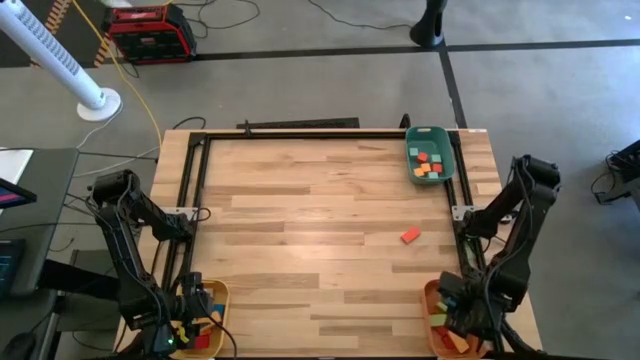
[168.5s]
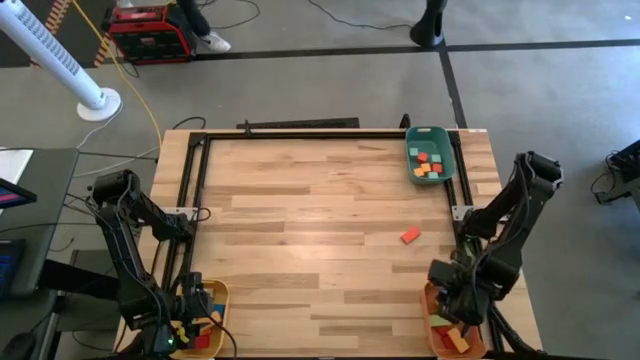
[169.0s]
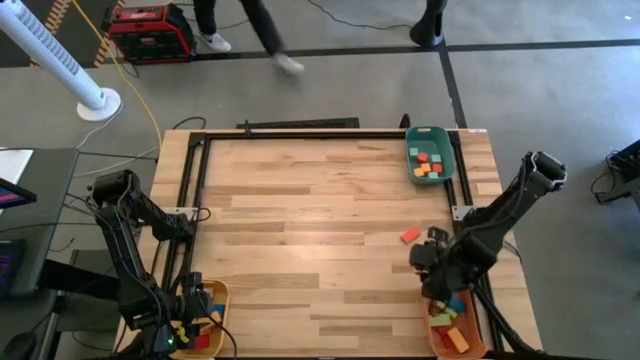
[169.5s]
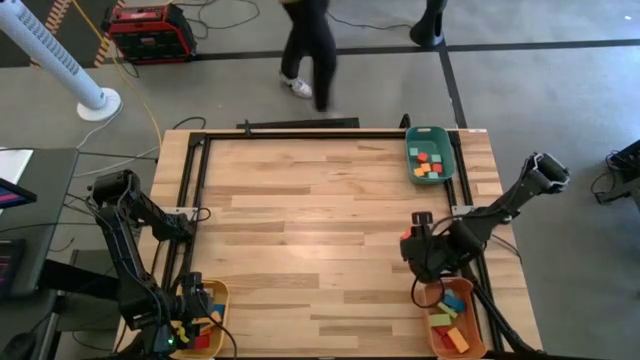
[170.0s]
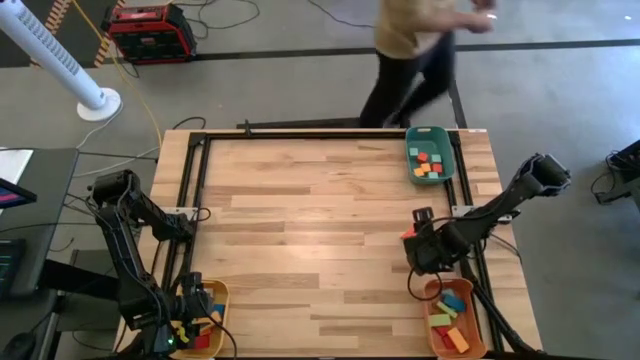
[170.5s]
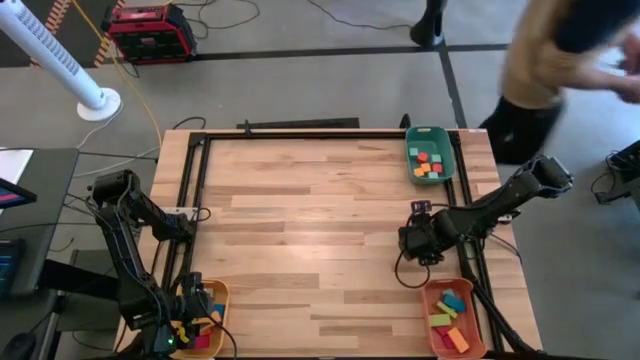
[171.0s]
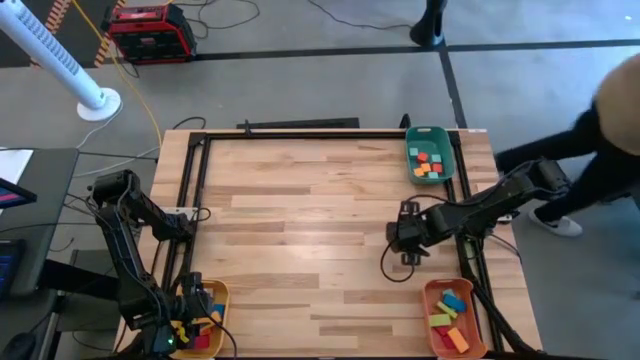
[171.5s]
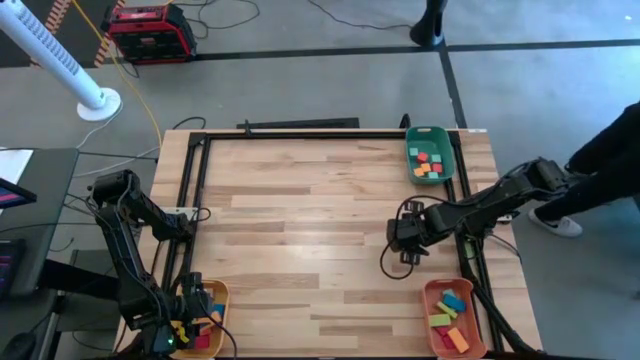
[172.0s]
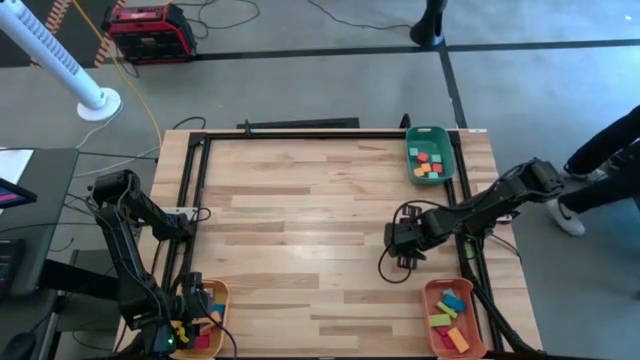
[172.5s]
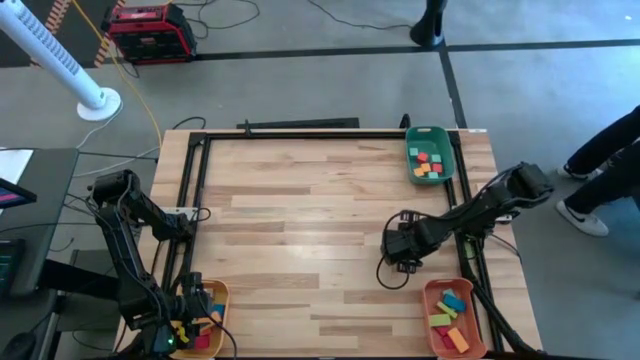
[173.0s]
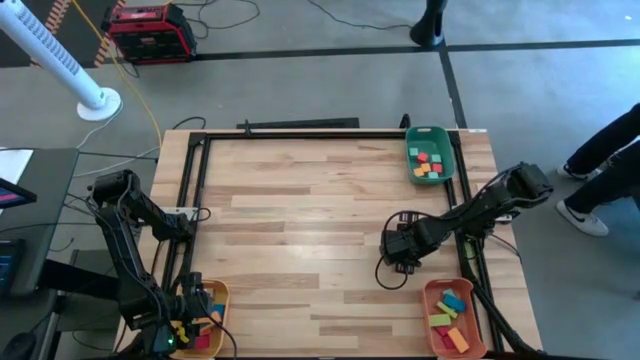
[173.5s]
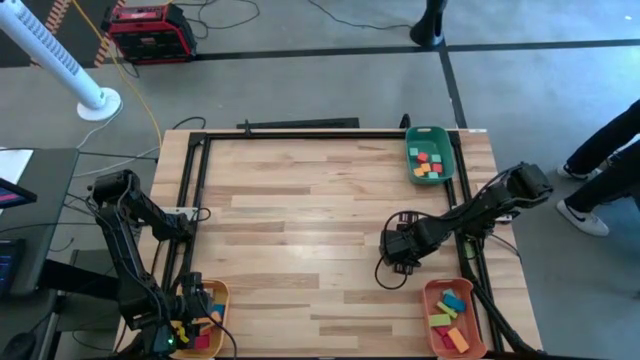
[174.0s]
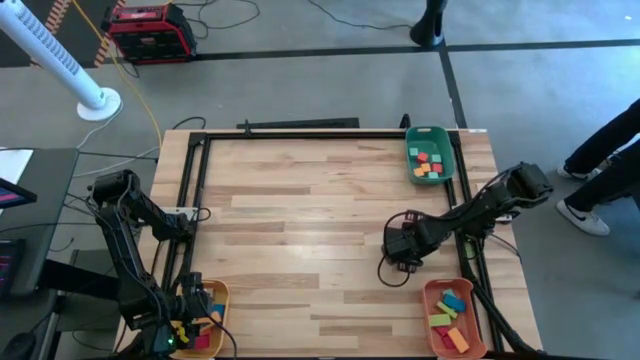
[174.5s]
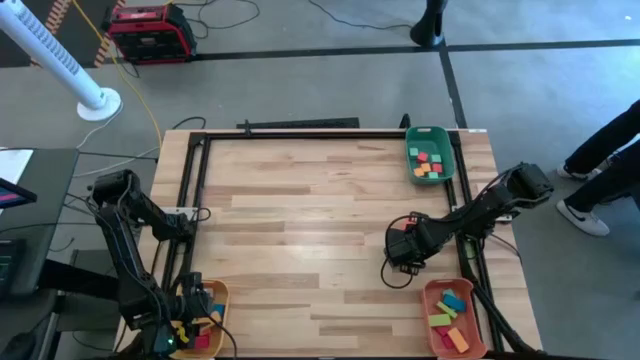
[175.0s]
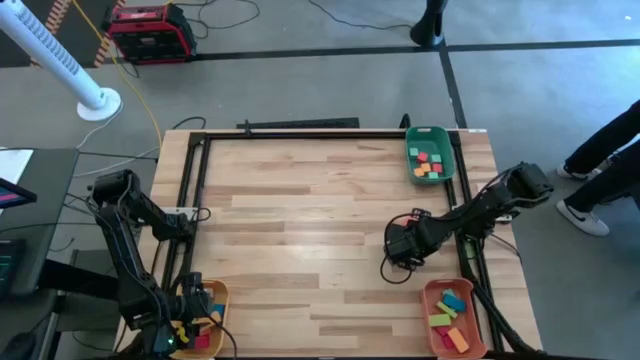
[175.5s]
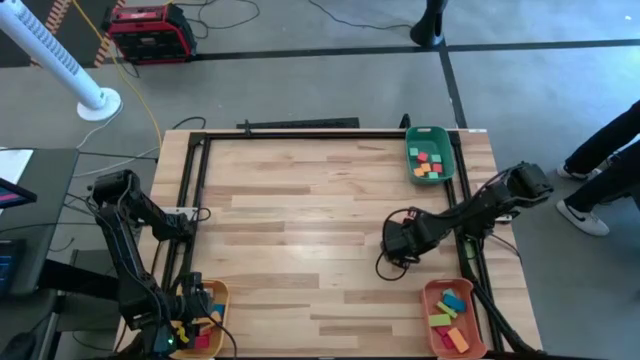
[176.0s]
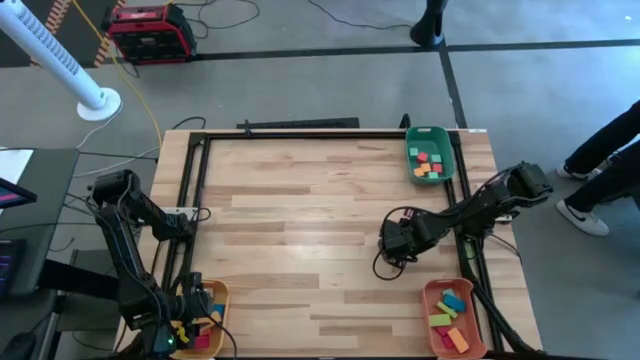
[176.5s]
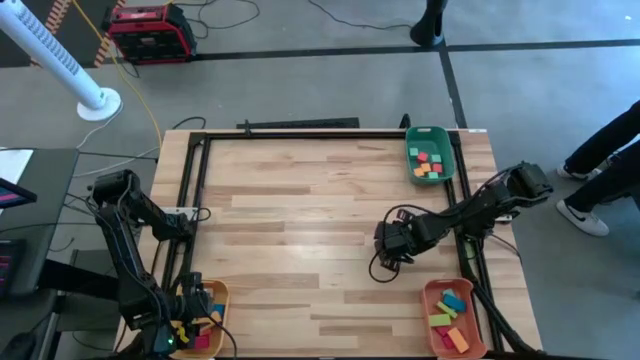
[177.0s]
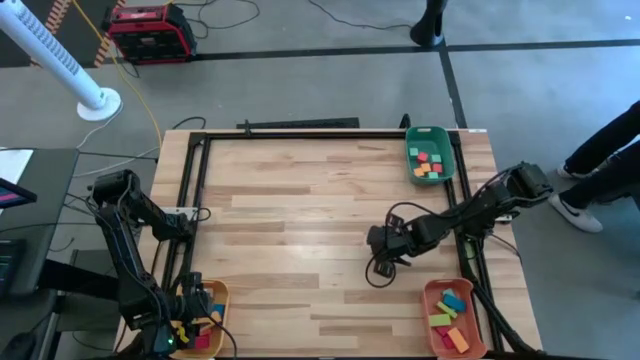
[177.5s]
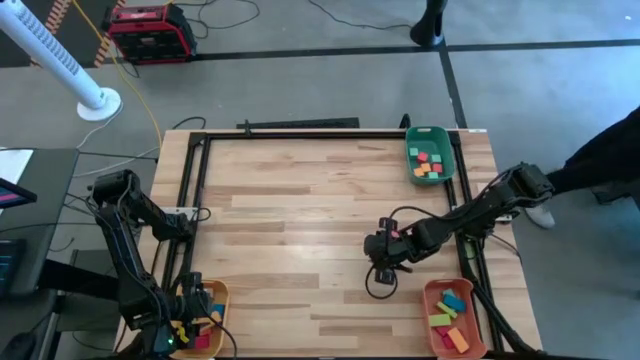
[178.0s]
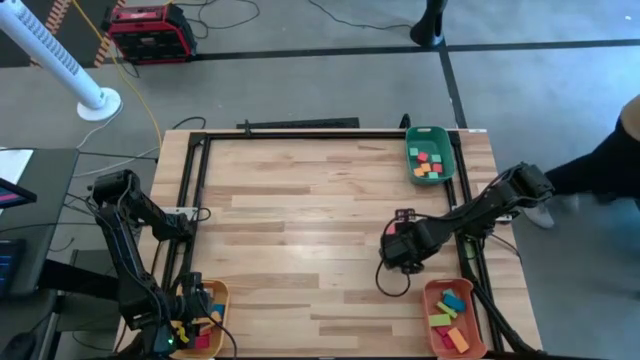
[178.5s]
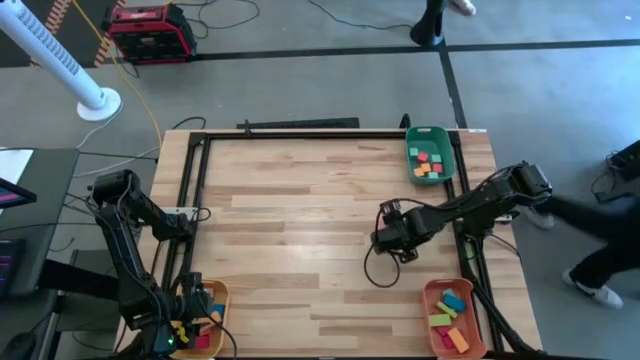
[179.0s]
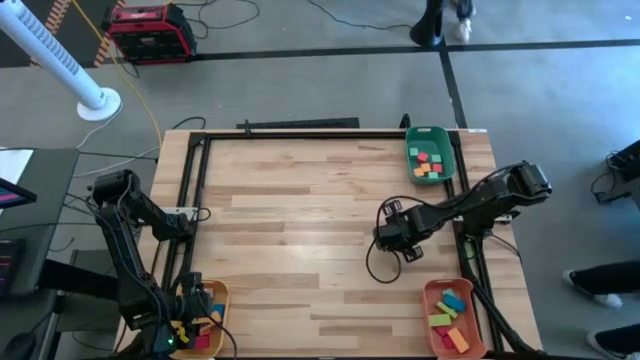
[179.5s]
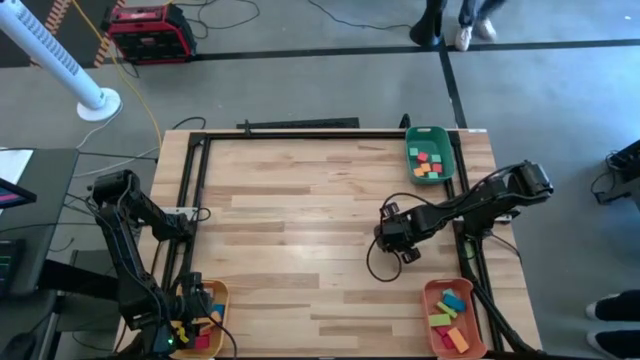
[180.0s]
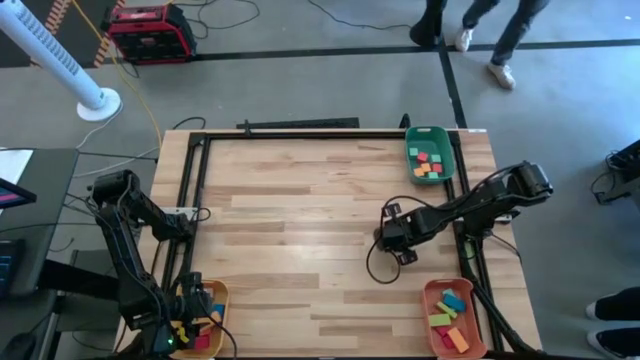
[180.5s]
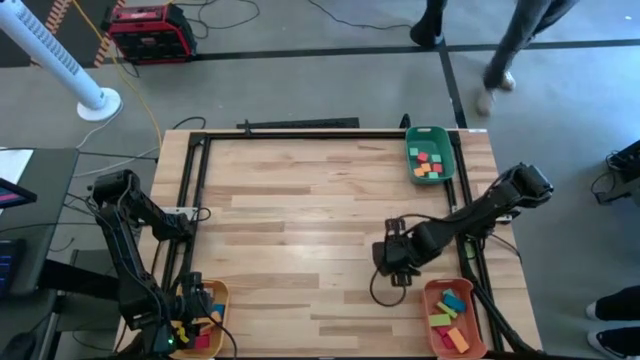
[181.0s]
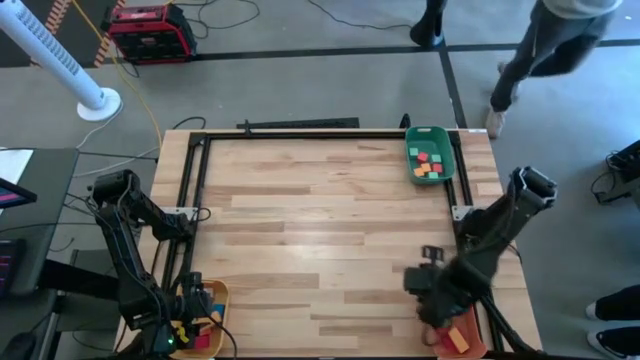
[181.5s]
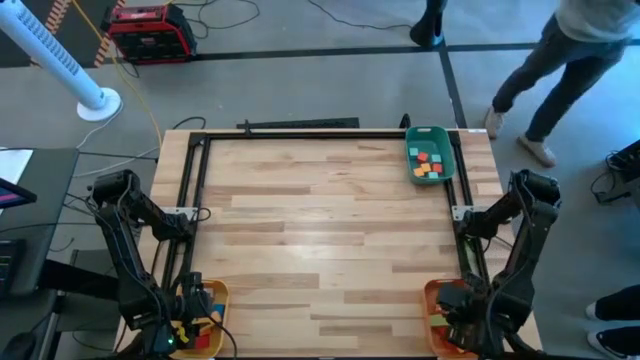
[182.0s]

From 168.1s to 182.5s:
Task: Sort blocks by size
Put the orange rectangle block into the orange bin

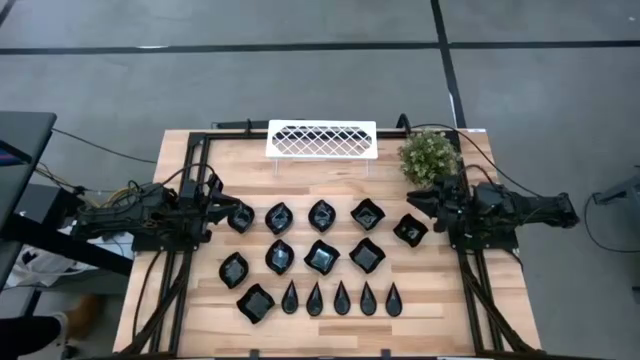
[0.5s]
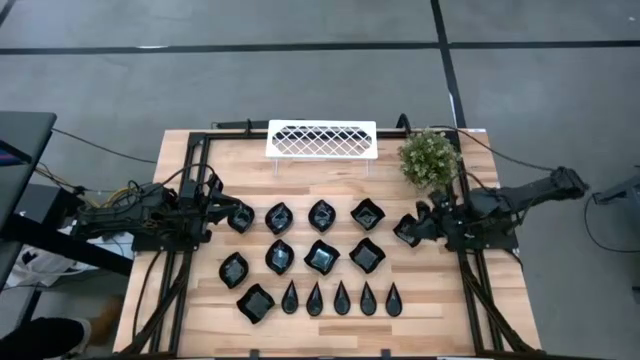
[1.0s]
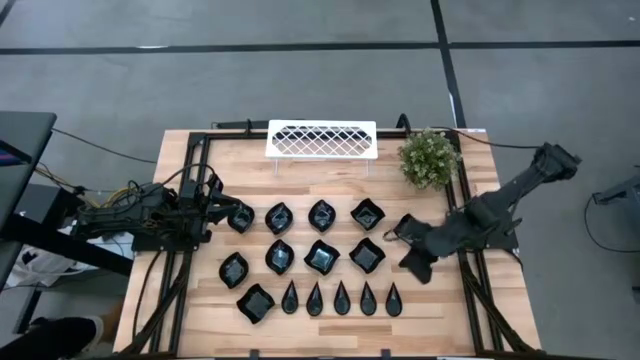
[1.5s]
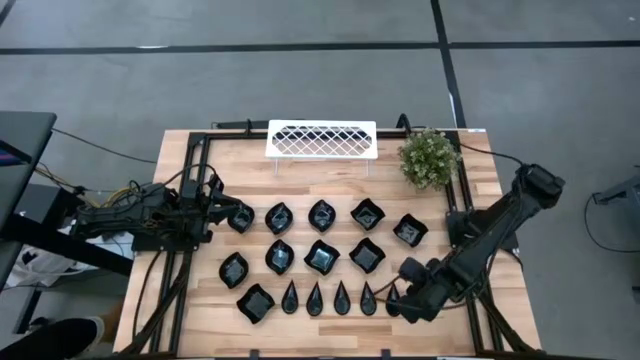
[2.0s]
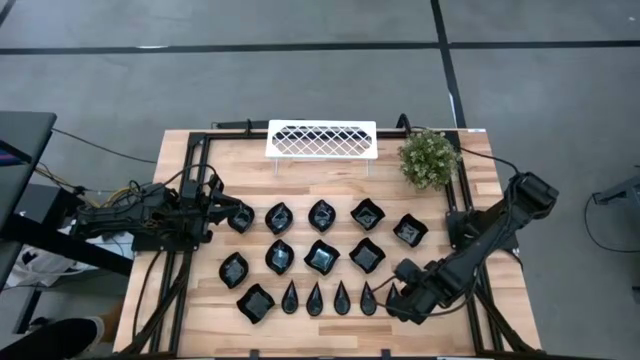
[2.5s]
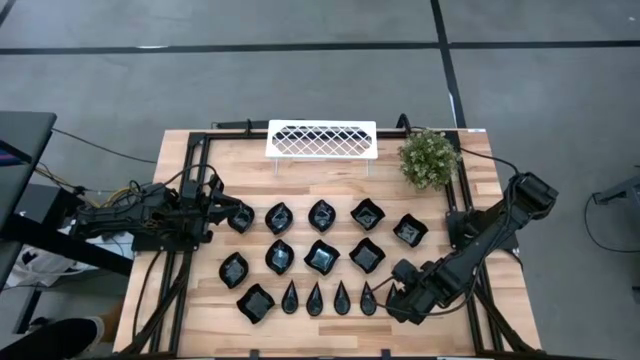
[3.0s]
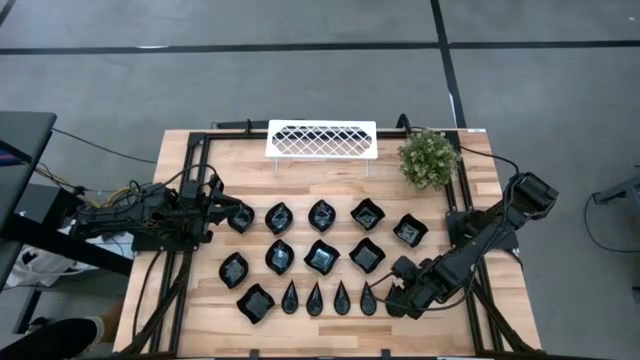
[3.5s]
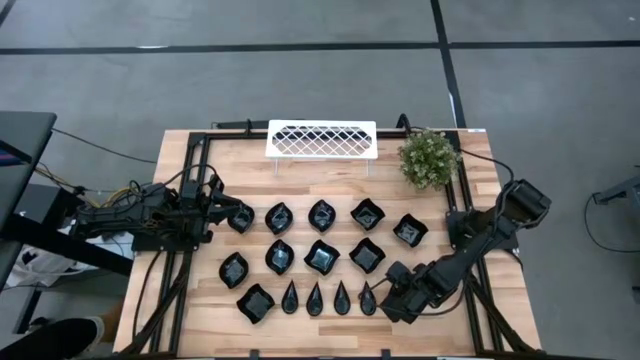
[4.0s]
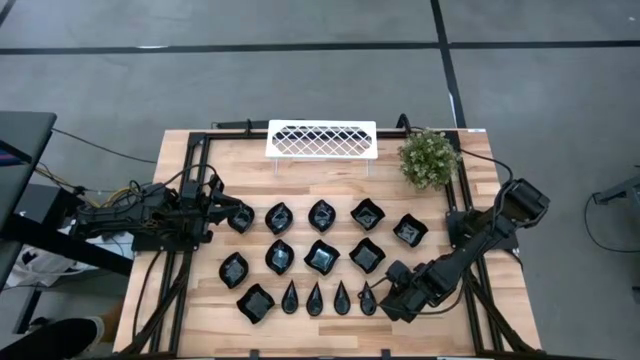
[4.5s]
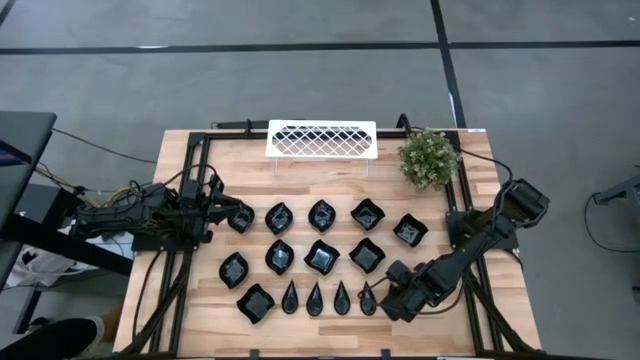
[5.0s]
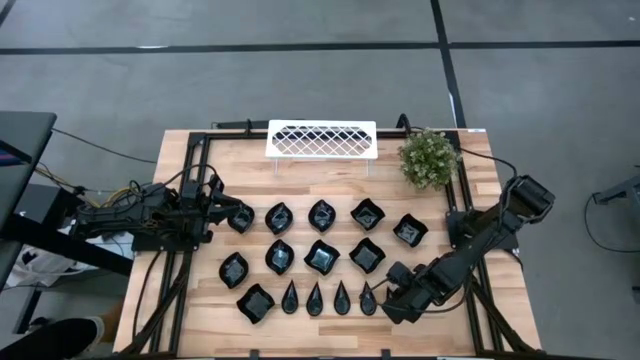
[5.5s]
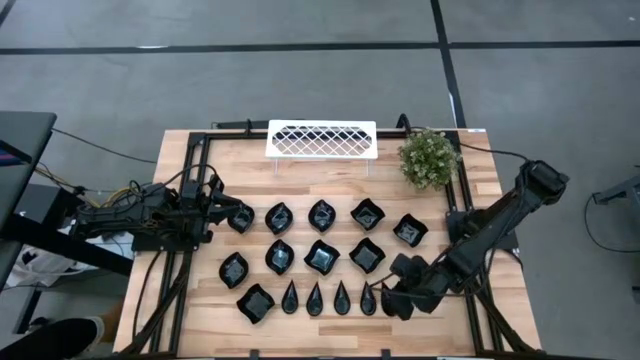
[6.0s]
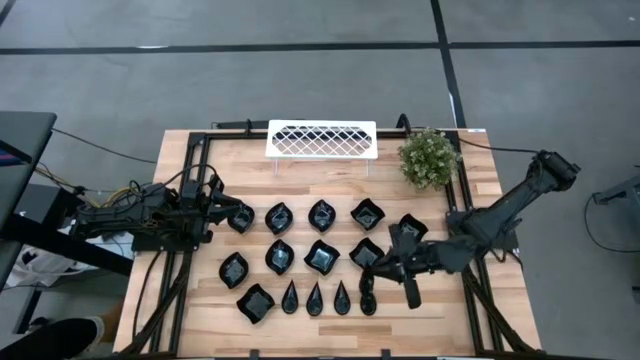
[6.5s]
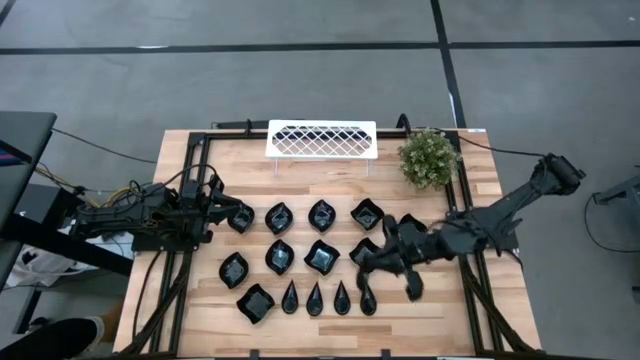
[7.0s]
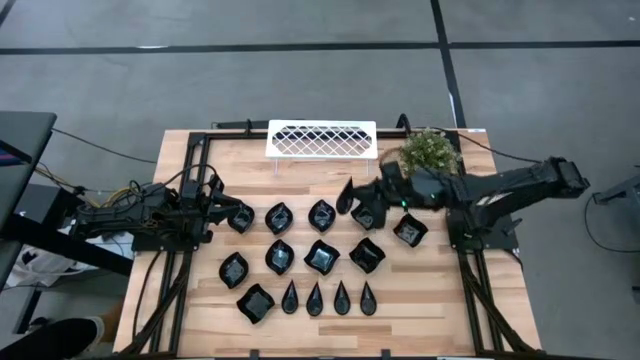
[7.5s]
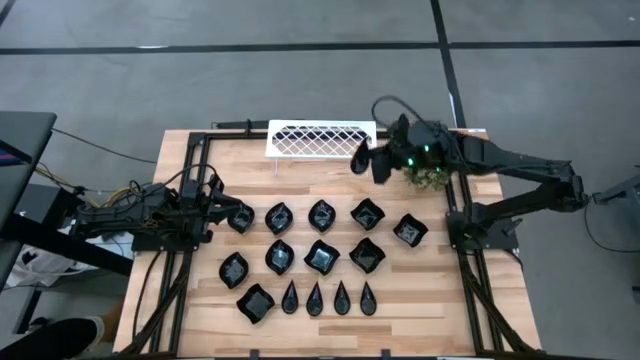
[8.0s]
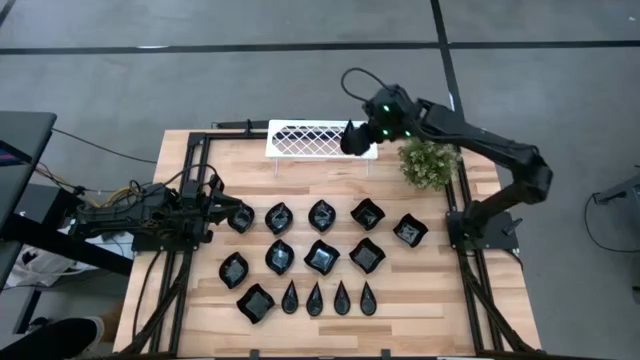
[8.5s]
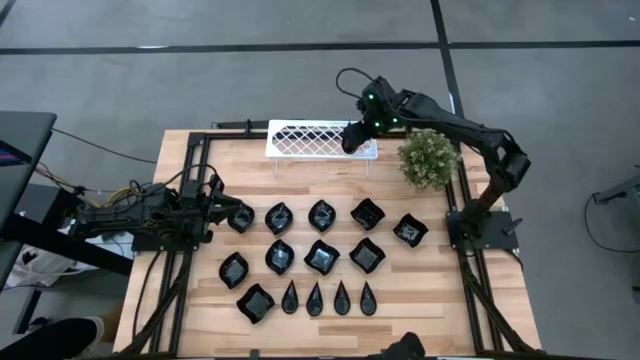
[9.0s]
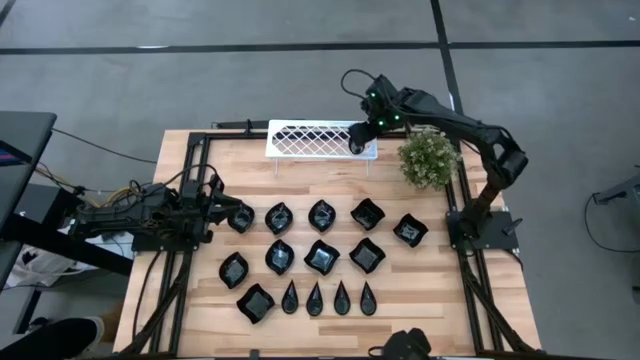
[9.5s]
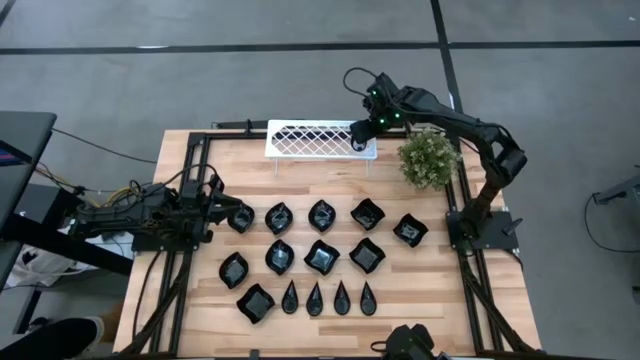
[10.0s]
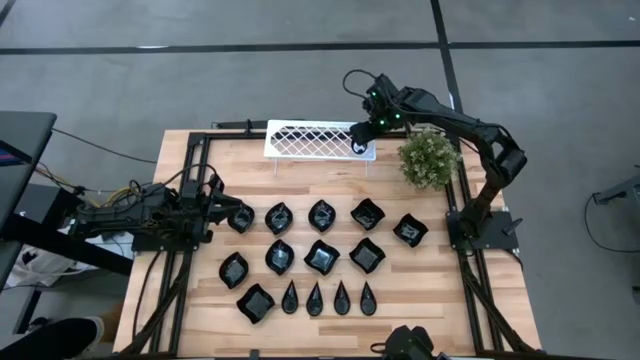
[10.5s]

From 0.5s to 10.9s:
Task: Pick & Place Mini shaped plates
Put the black drop shaped plate on the shelf
